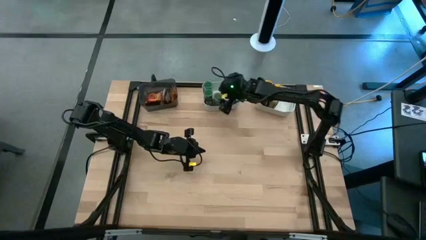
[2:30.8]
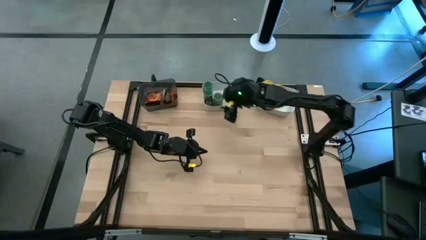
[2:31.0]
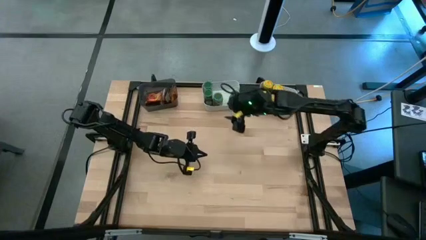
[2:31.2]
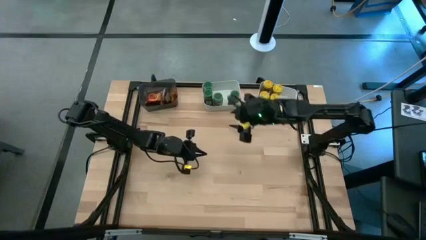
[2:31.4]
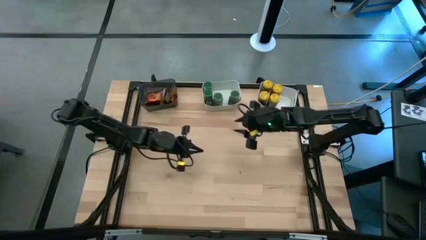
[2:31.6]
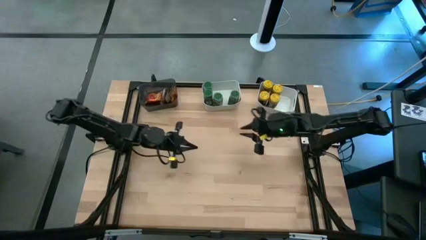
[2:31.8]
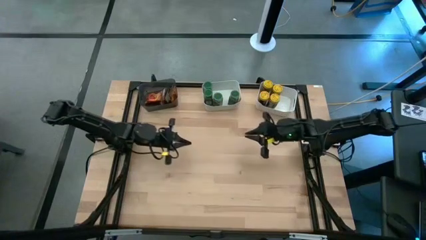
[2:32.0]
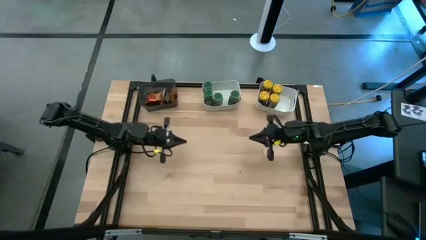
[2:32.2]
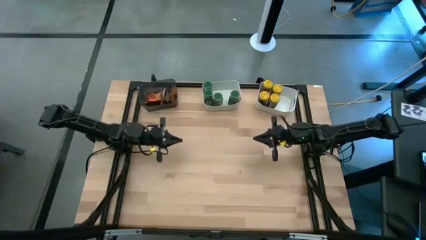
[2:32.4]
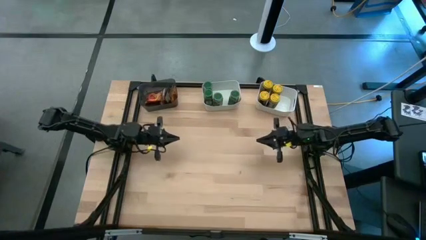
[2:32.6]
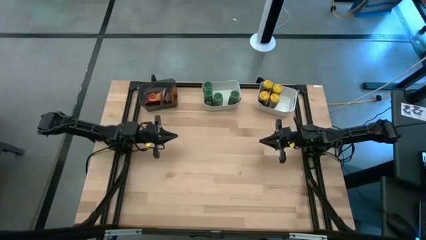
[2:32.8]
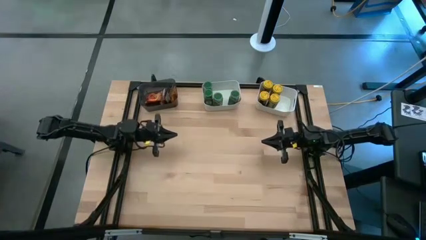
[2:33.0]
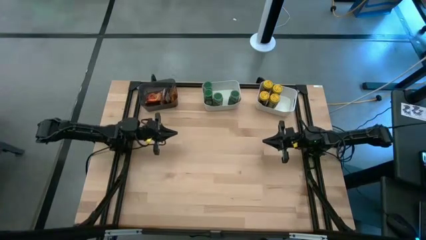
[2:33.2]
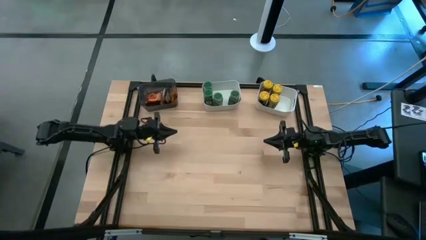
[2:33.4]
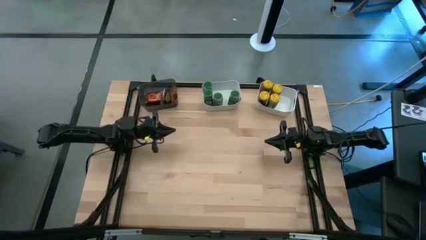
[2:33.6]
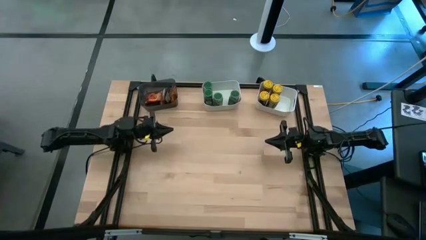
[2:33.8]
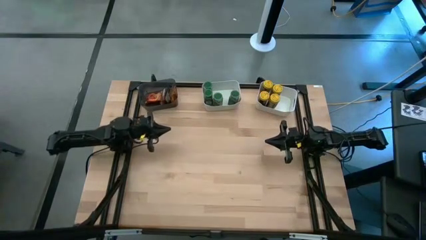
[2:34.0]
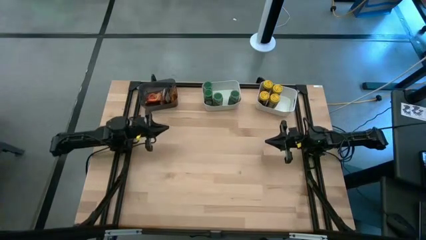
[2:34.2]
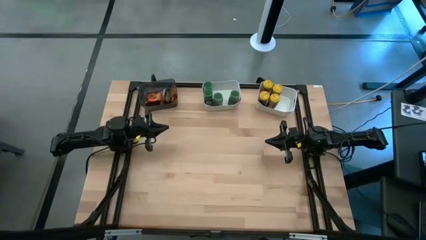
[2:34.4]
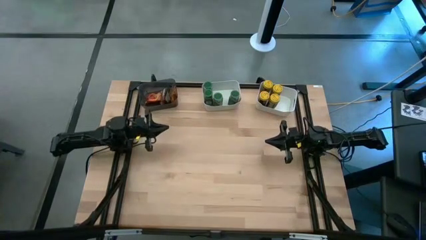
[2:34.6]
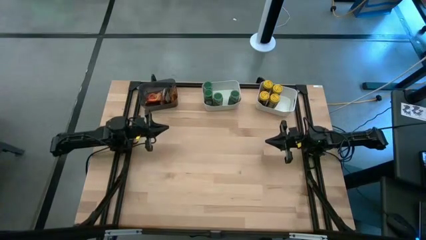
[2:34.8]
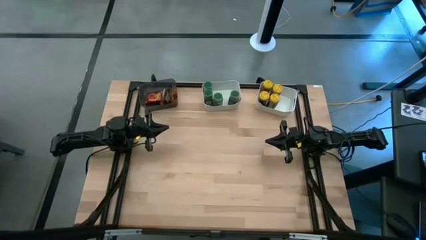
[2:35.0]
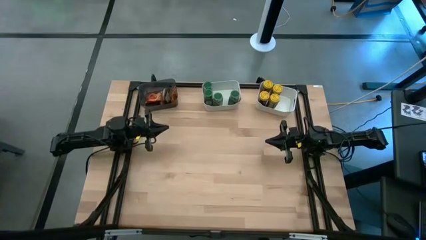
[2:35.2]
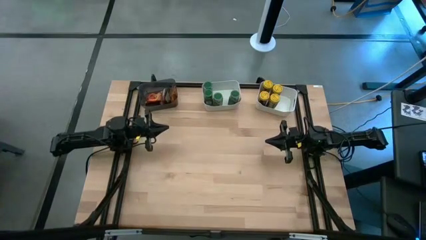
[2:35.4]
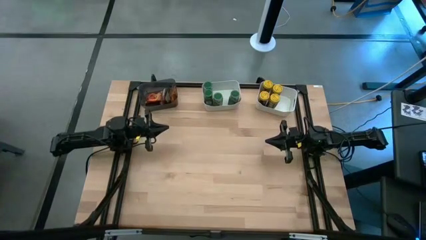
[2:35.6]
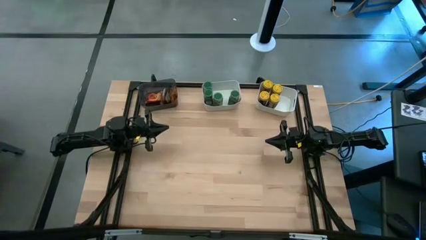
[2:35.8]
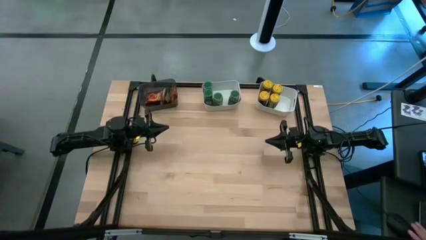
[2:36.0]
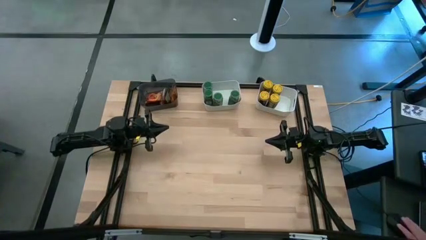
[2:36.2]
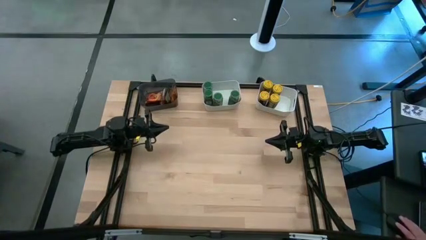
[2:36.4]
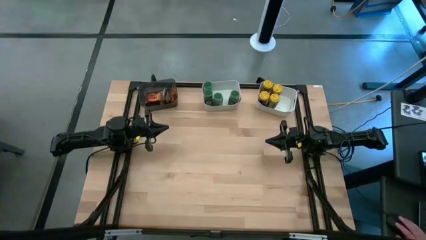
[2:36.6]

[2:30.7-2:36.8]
Task: Sort spices by type
Return to home position

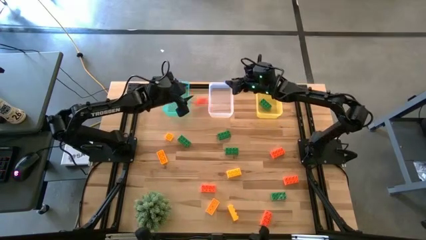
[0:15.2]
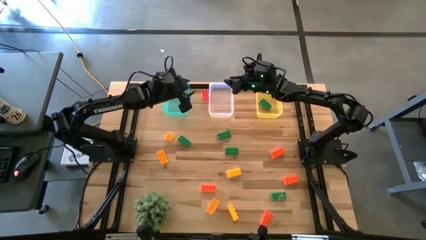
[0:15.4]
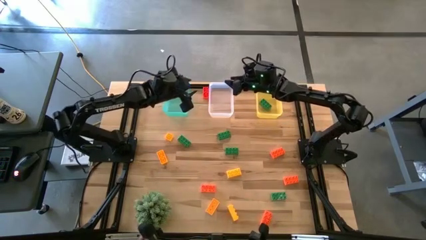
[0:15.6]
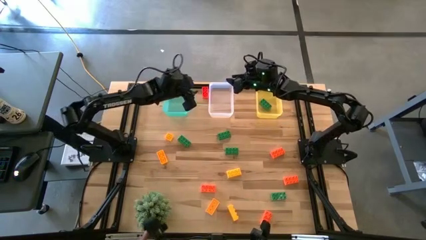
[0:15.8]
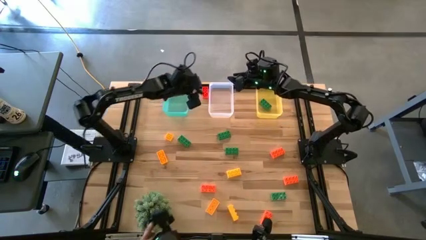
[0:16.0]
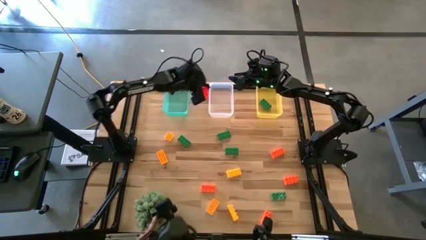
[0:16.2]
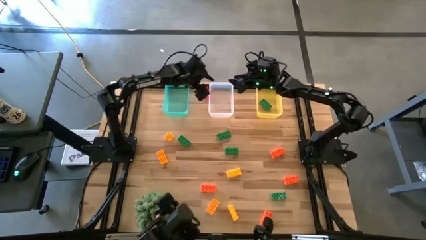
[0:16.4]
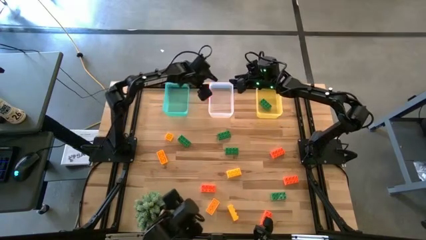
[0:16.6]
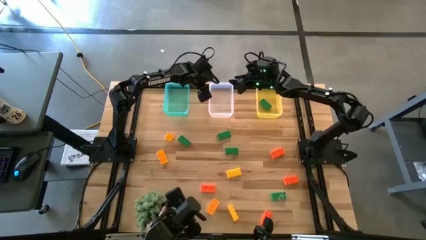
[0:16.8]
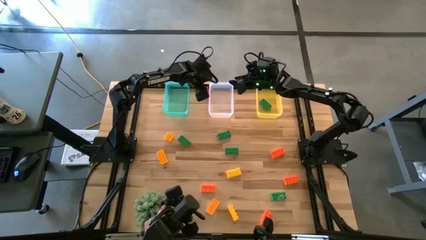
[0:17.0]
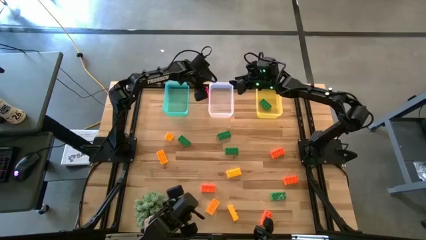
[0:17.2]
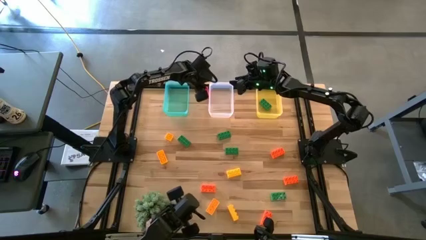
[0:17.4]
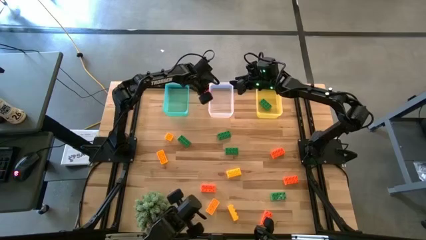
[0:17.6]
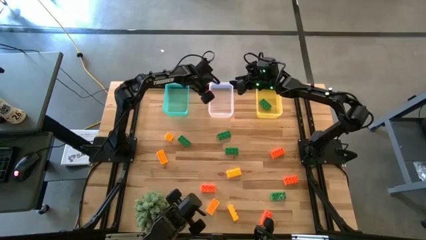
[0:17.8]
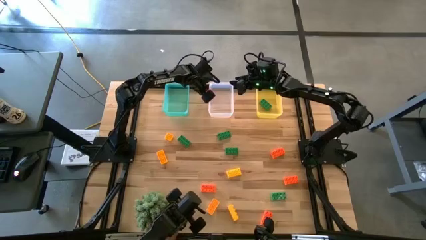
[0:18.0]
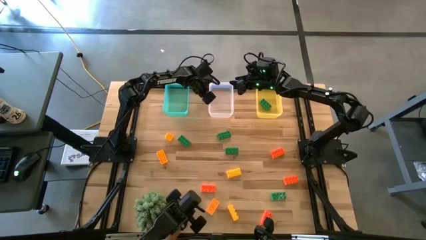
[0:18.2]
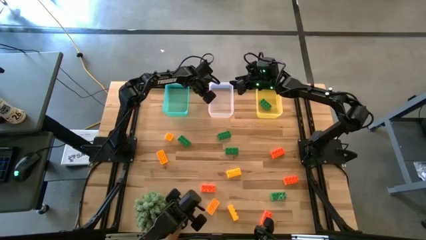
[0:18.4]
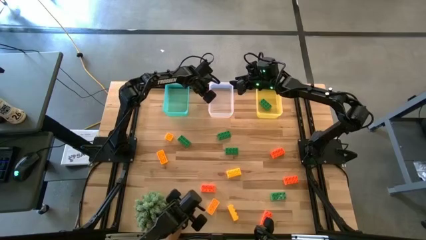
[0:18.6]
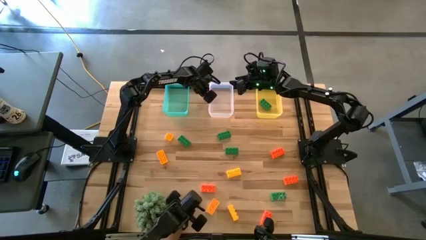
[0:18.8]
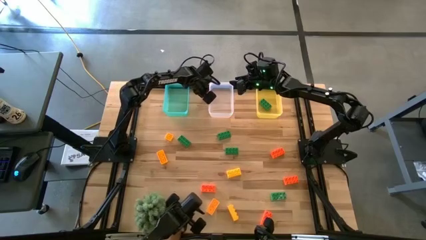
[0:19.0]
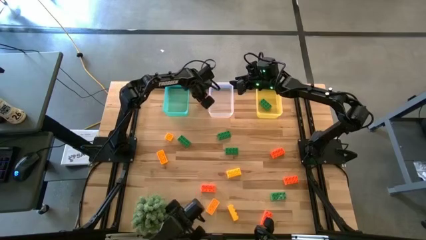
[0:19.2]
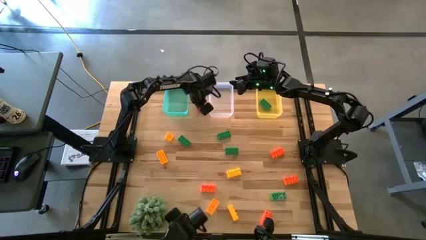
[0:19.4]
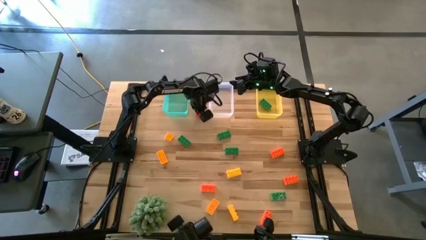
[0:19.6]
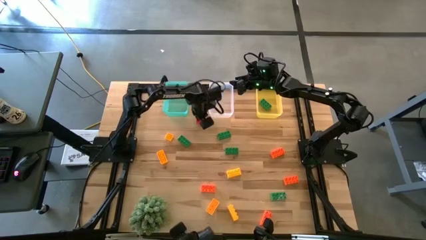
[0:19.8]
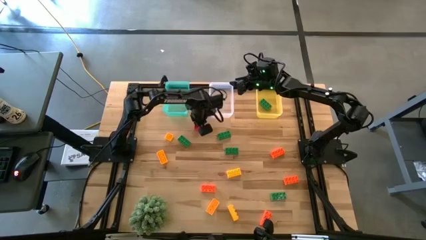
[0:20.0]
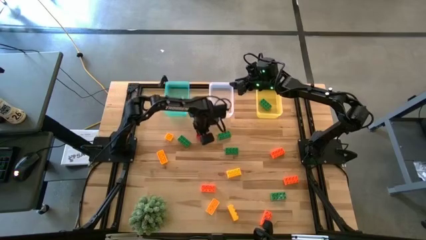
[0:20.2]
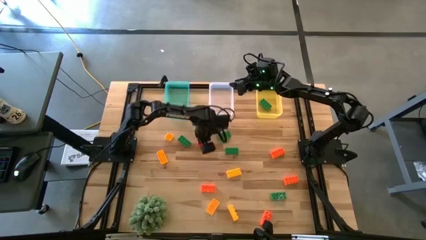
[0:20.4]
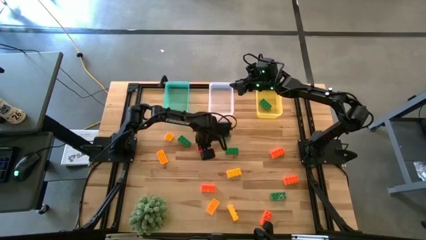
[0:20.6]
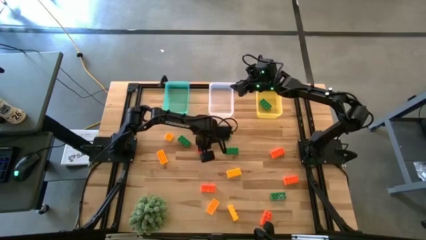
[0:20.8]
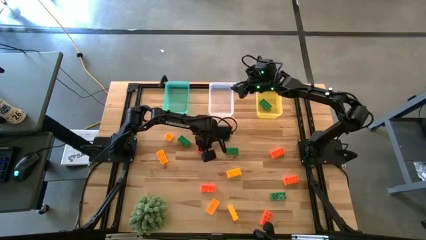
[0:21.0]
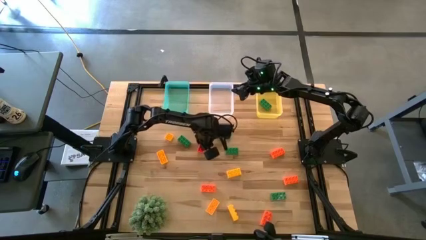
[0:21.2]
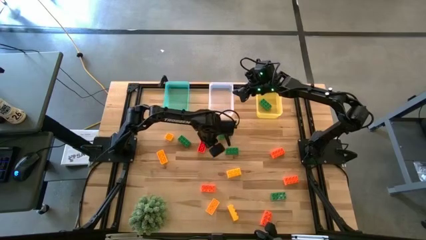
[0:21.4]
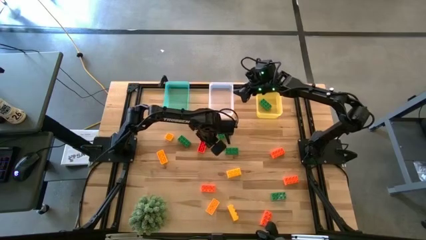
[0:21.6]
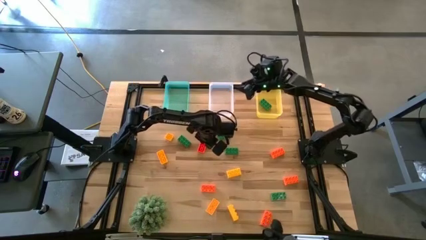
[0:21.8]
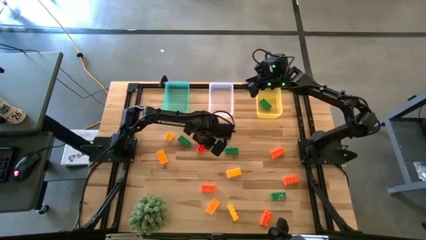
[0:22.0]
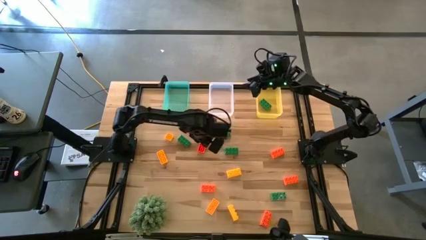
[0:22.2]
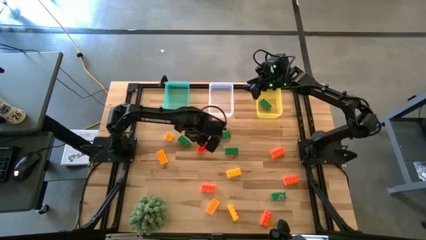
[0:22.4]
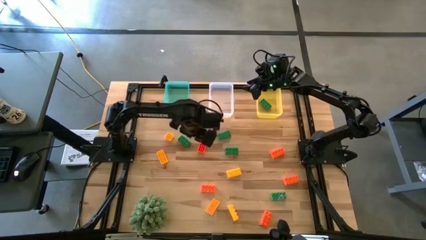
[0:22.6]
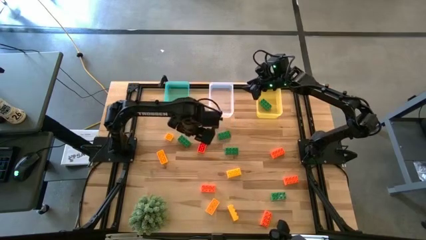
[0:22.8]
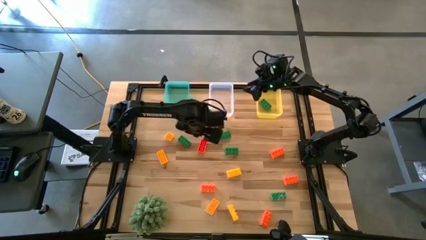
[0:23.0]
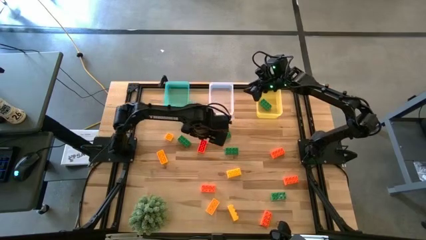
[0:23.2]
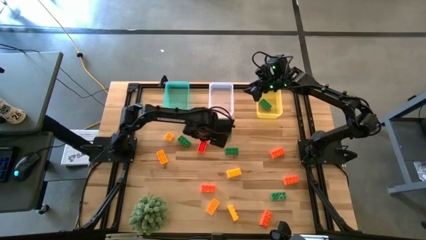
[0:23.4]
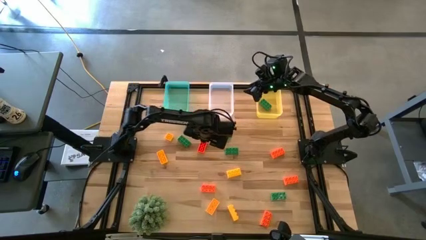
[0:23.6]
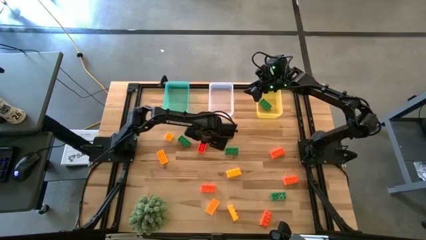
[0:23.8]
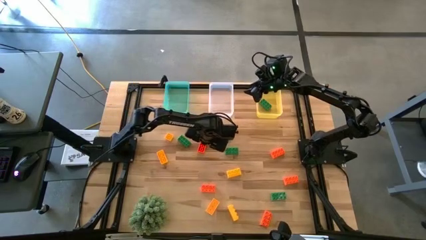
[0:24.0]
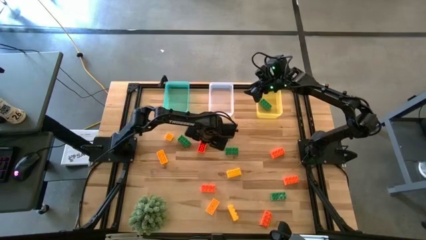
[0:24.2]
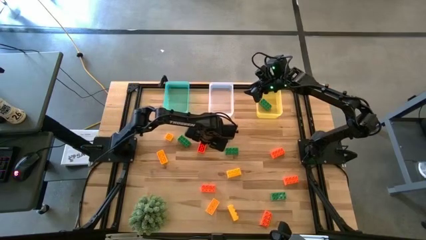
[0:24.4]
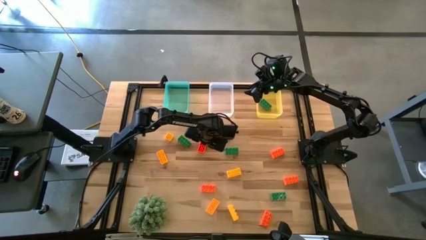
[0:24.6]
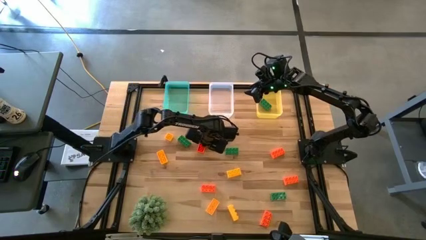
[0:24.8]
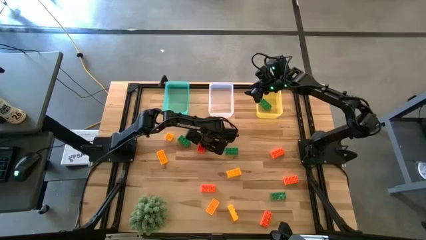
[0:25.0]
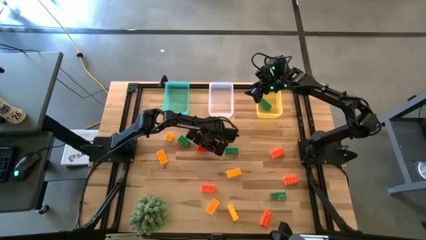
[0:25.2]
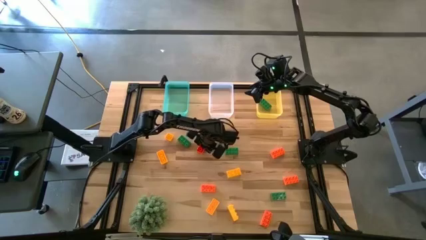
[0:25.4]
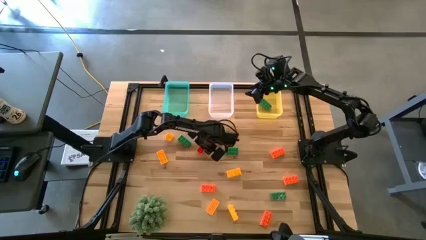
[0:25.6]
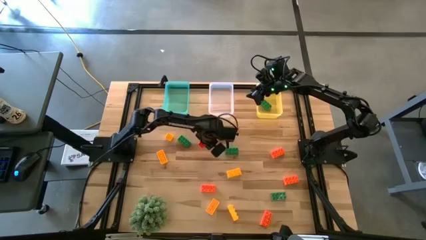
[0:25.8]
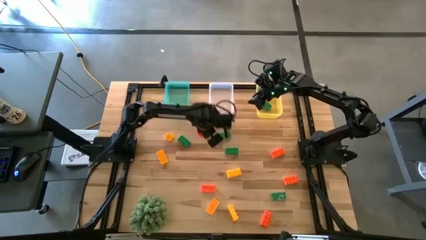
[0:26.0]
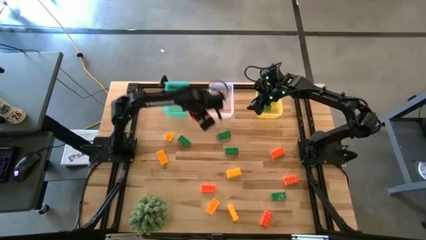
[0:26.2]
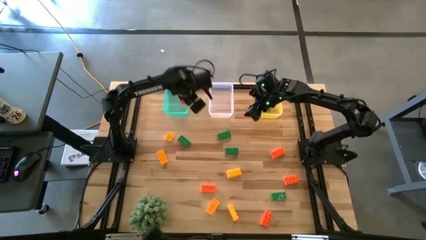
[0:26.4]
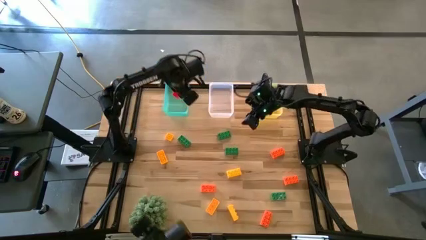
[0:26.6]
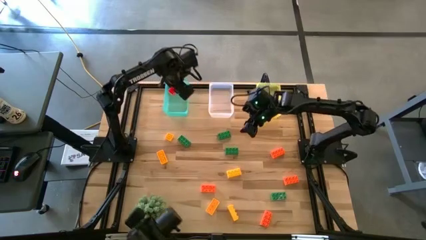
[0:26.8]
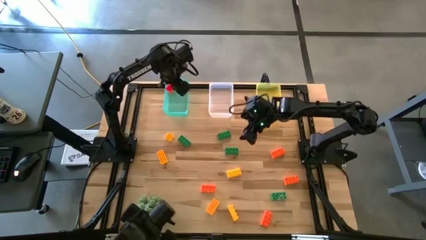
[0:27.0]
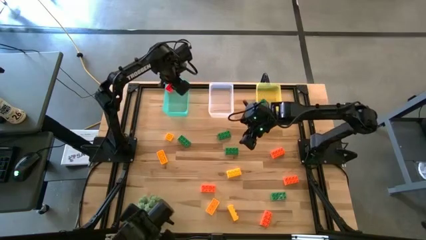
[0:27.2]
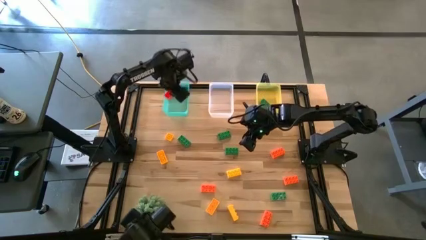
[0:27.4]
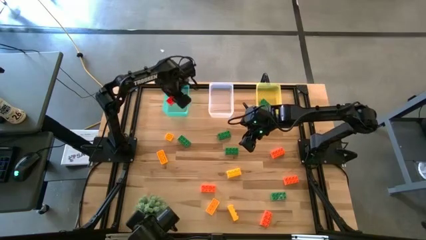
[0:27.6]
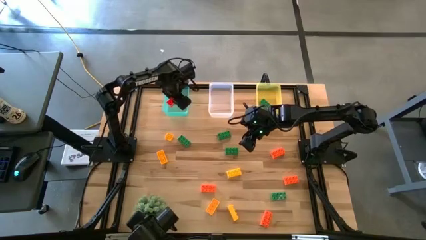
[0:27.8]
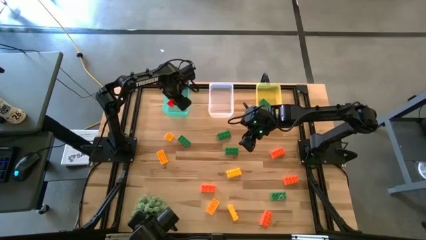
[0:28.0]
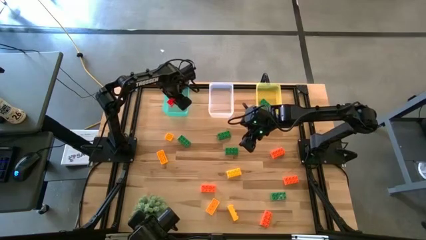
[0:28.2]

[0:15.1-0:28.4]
Task: Sort & place blocks by color
Put the orange game piece into the blue bin
